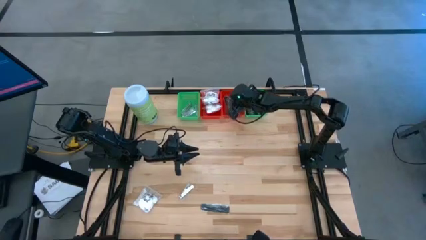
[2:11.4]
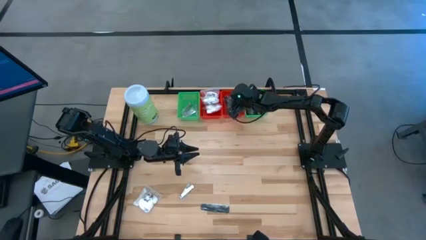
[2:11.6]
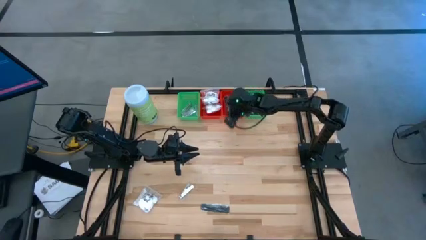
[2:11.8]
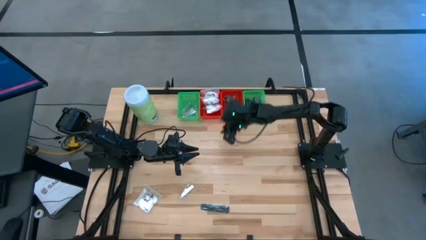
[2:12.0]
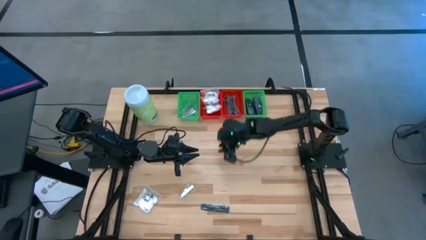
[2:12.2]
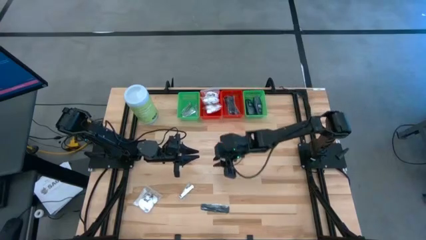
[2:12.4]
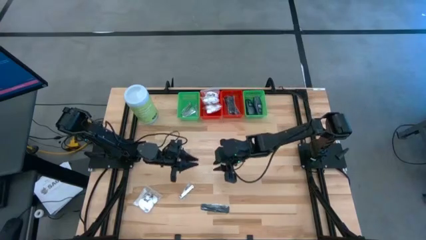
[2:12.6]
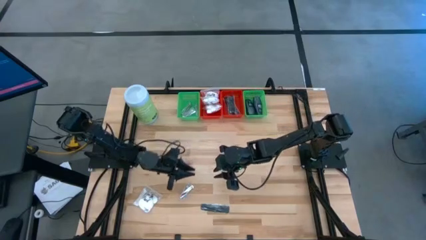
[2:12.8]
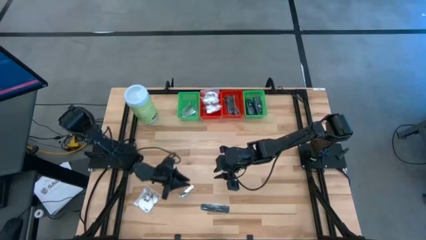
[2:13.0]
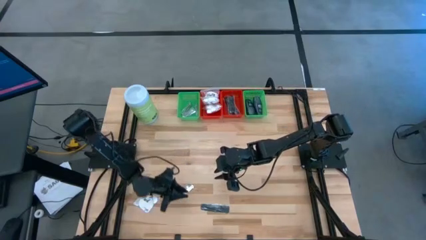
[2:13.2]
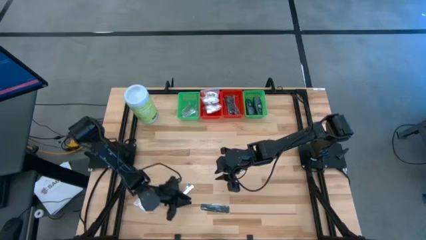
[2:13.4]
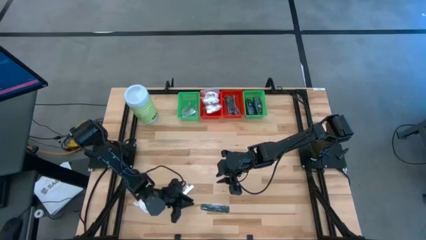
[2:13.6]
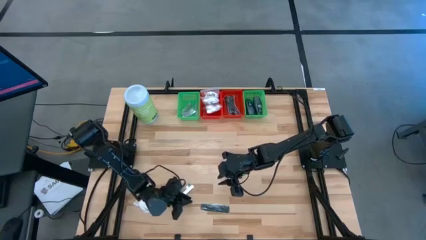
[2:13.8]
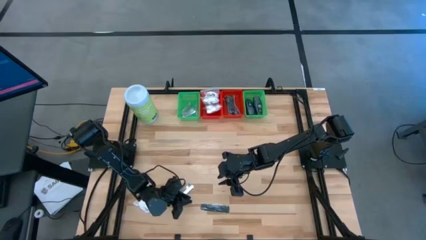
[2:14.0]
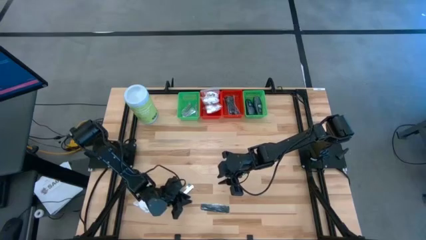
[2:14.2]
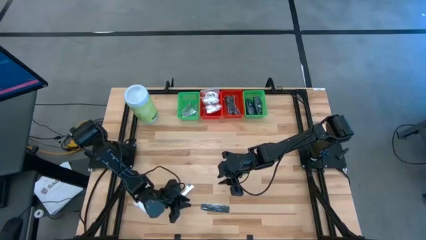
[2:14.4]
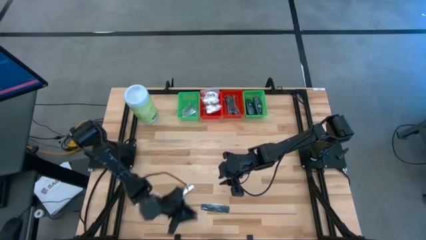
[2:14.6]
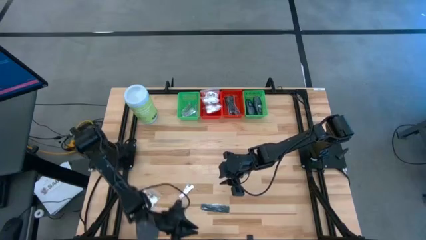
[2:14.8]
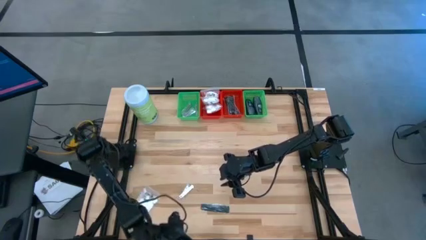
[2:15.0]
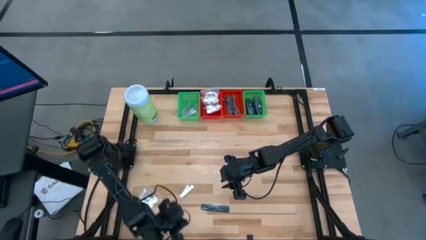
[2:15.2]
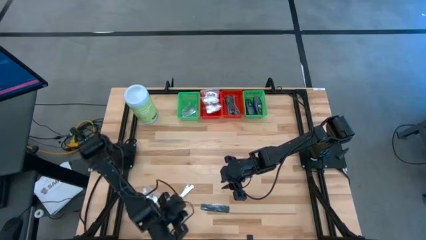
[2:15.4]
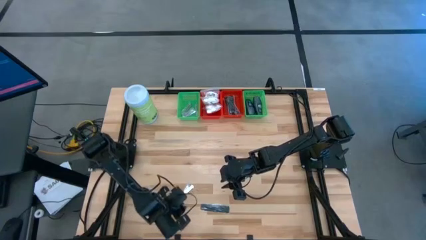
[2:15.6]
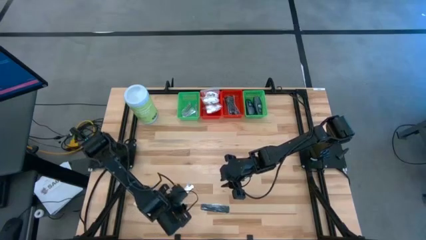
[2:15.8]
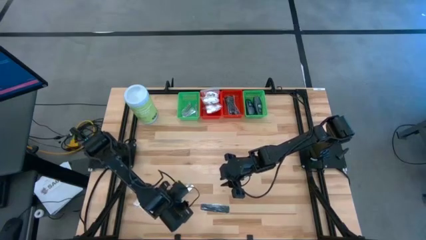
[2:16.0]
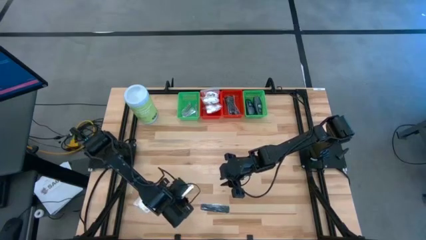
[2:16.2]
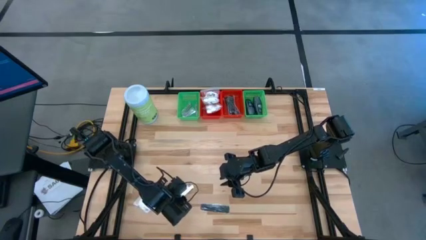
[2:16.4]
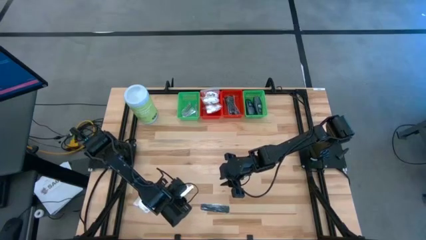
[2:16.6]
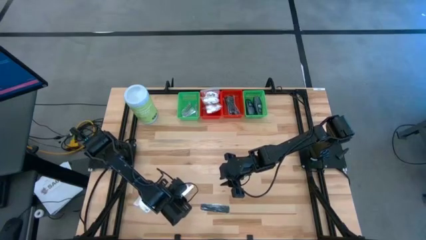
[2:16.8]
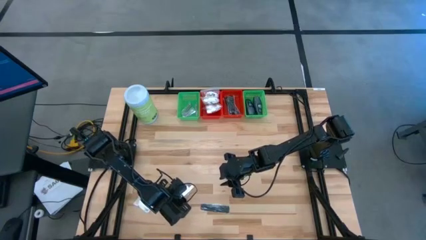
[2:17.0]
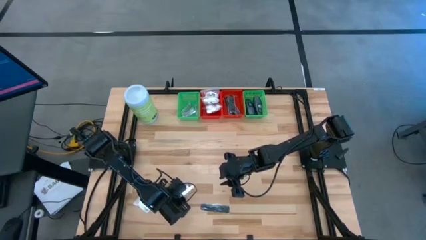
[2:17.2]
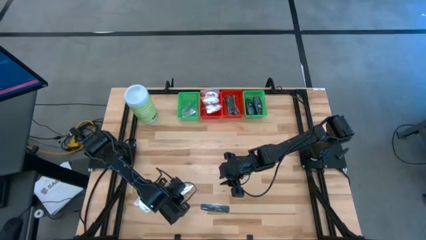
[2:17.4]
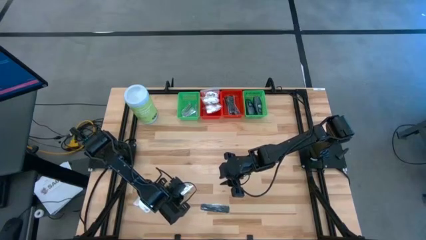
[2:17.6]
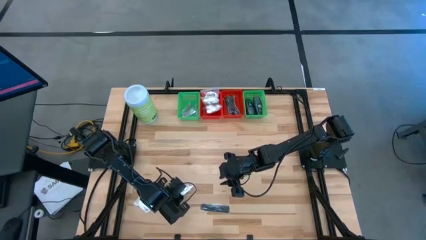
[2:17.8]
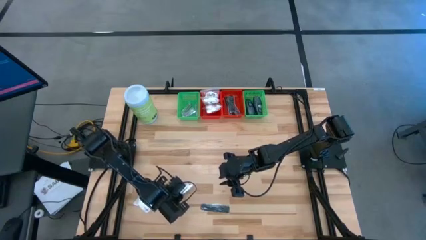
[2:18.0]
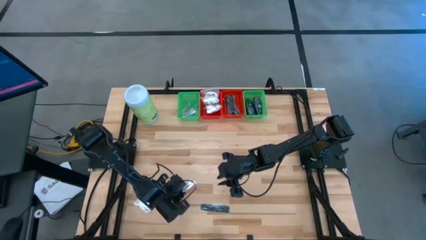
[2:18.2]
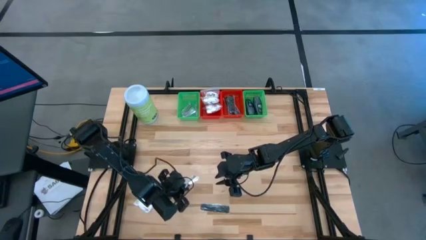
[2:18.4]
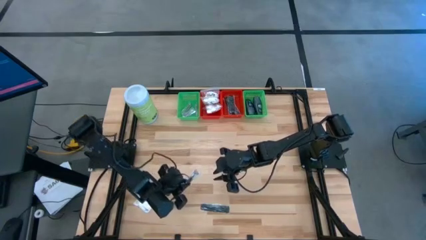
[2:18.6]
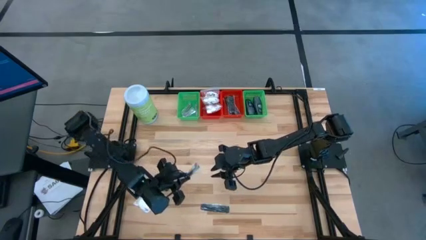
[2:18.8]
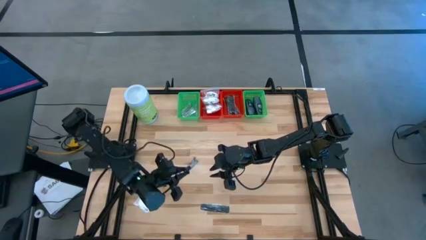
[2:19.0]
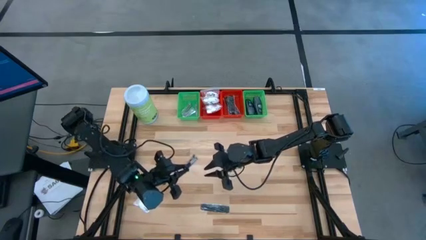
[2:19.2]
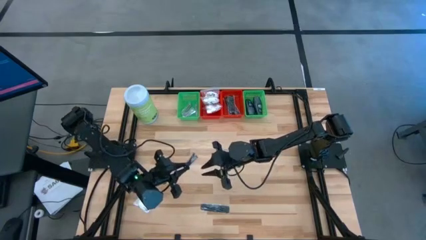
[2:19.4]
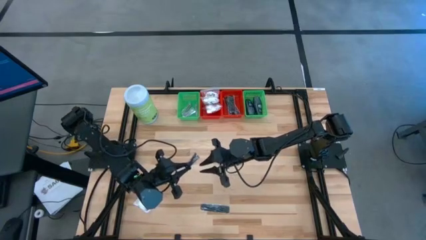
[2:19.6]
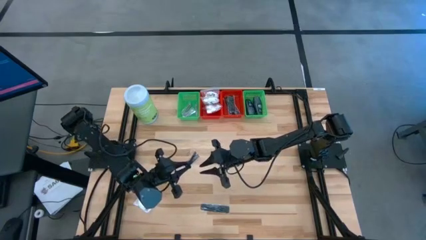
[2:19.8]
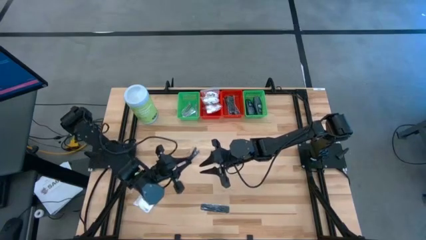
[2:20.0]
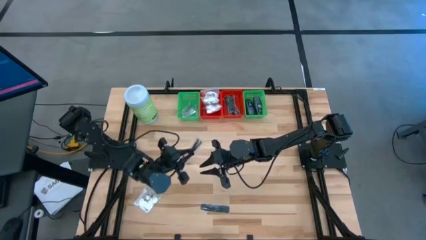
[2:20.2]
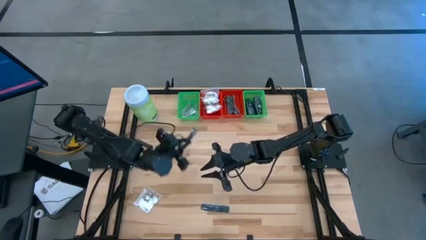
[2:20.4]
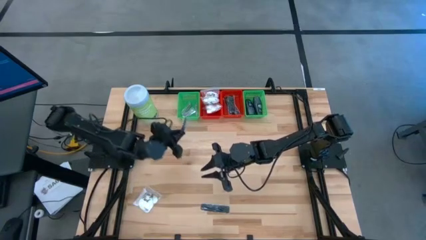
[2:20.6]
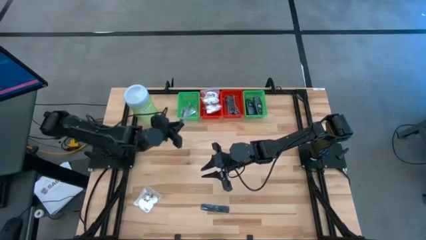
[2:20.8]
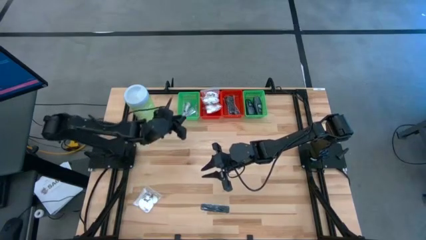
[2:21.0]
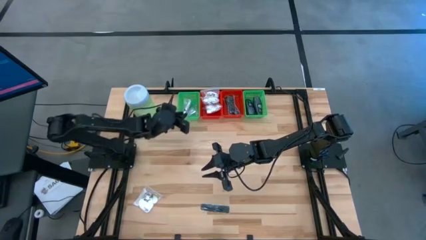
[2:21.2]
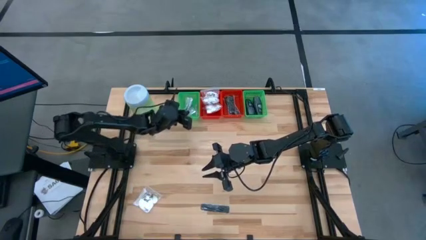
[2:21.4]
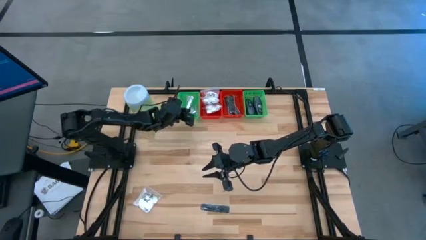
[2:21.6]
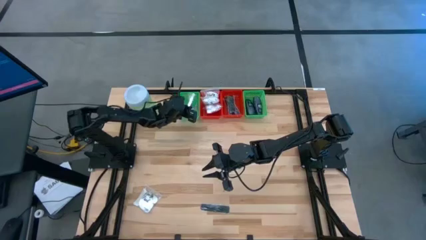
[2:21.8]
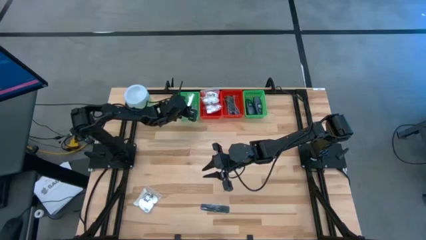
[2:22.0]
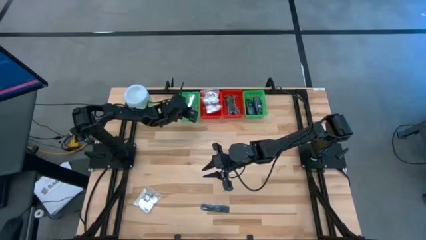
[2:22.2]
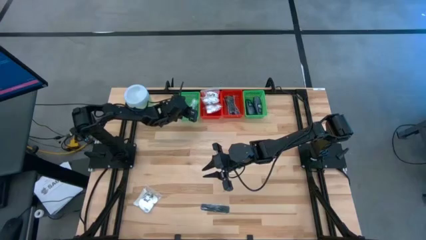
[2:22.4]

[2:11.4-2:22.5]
Task: Pick & Place Travel size toiletries
Put the silver nail cutter into the left green bin
